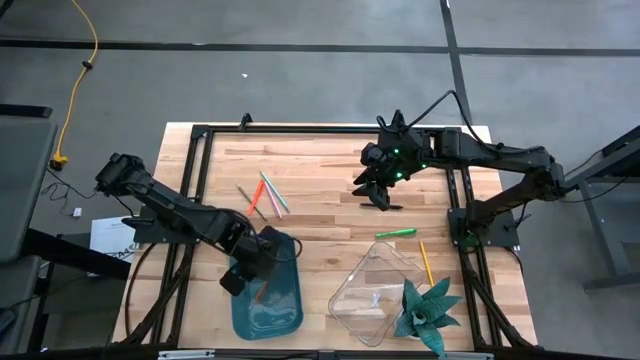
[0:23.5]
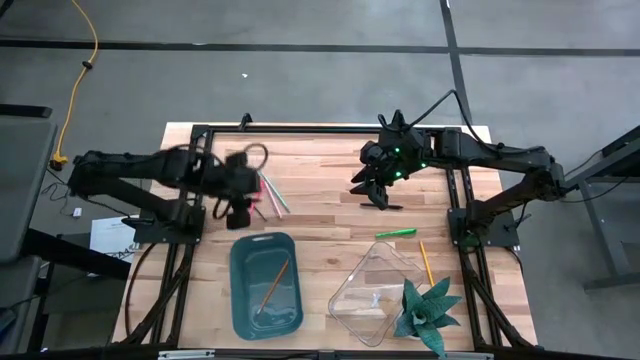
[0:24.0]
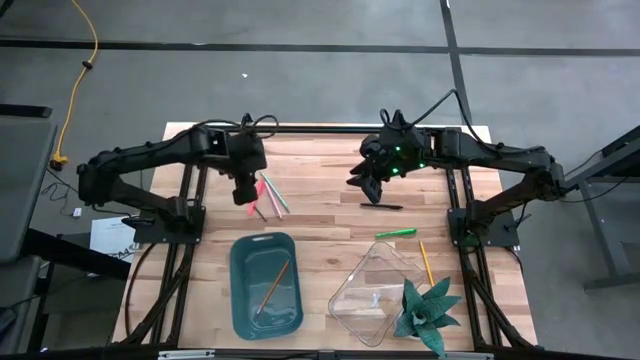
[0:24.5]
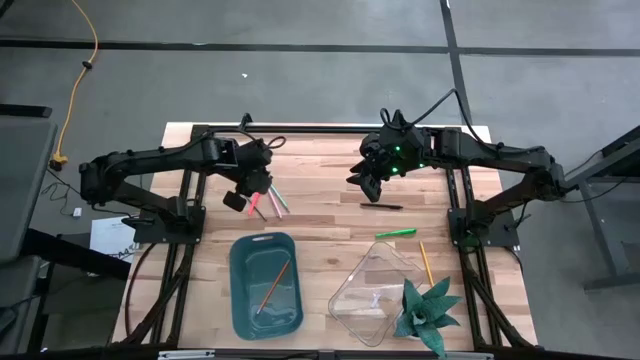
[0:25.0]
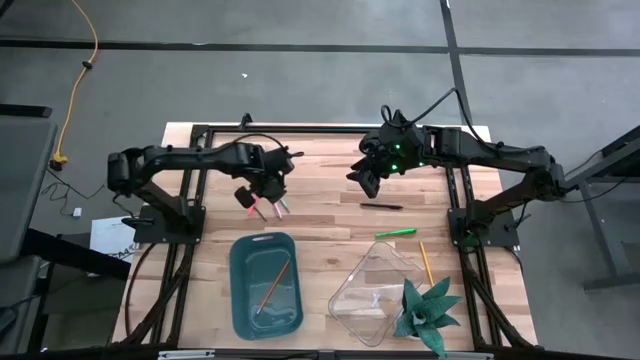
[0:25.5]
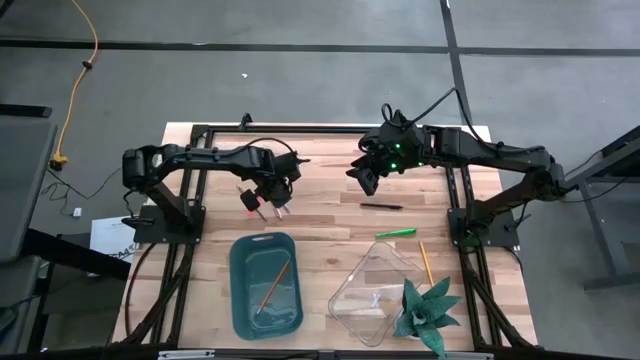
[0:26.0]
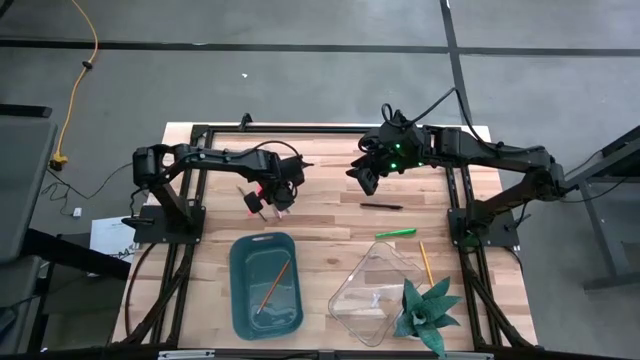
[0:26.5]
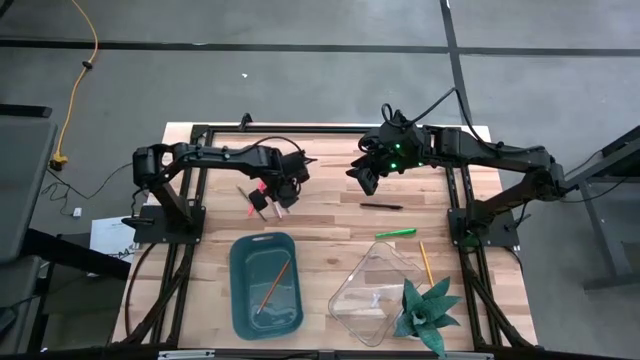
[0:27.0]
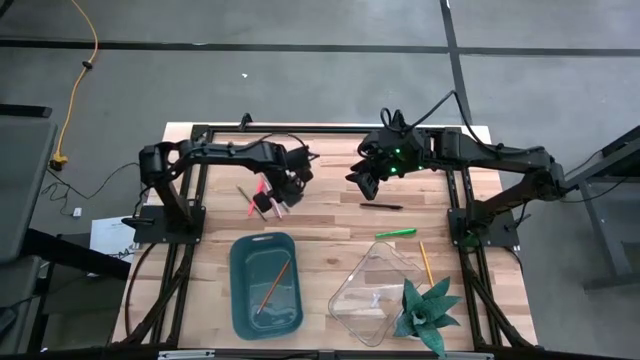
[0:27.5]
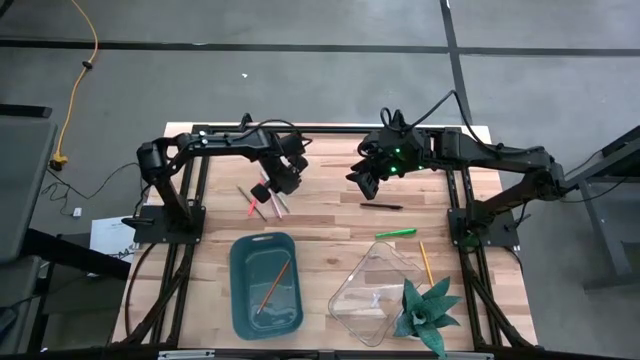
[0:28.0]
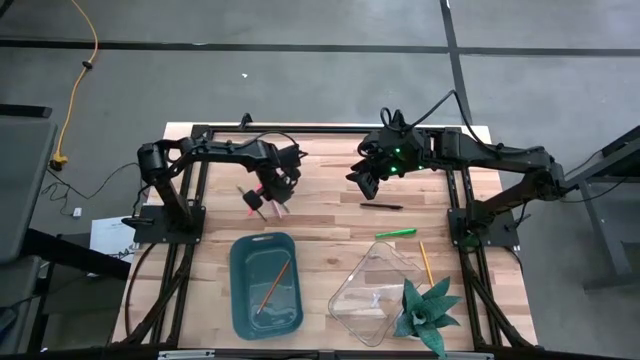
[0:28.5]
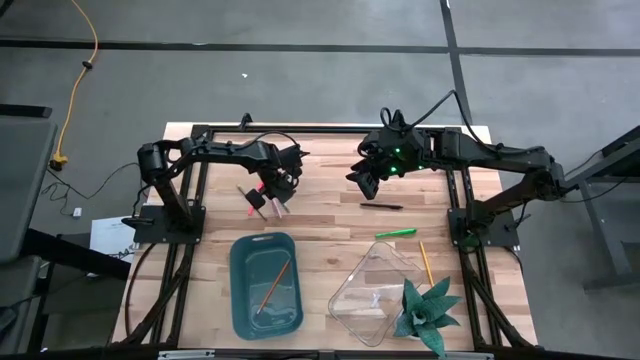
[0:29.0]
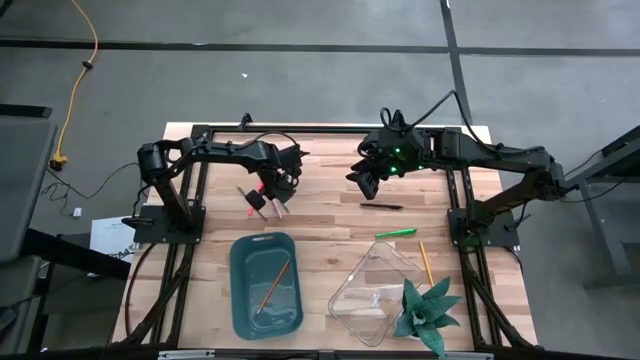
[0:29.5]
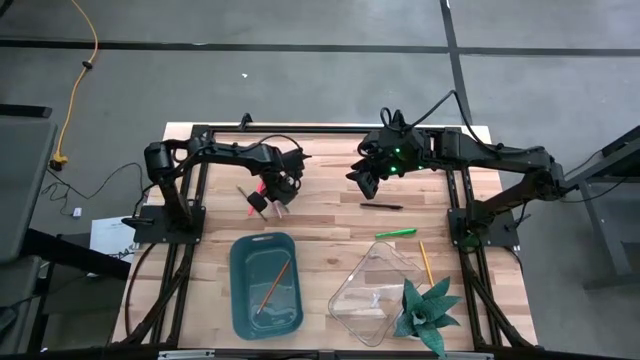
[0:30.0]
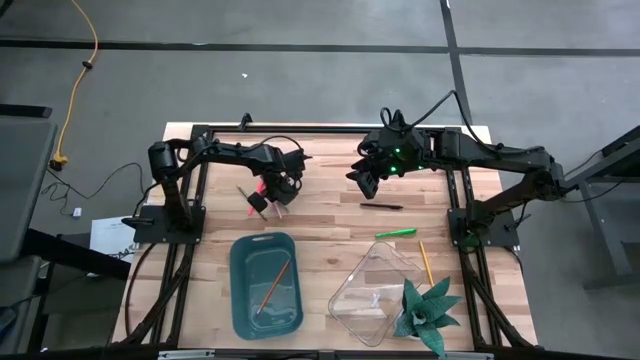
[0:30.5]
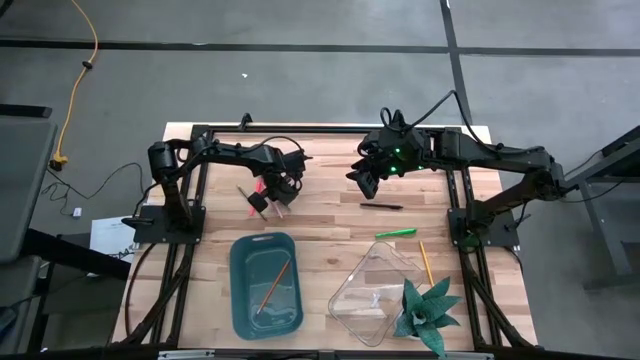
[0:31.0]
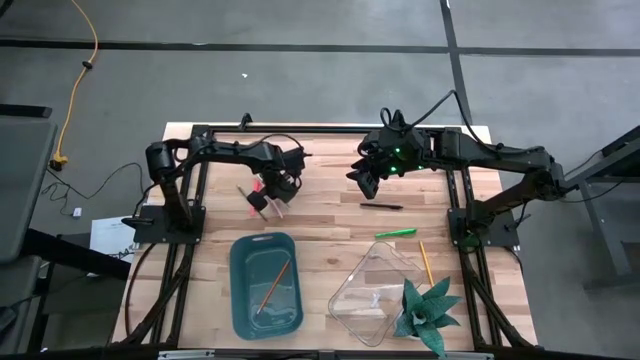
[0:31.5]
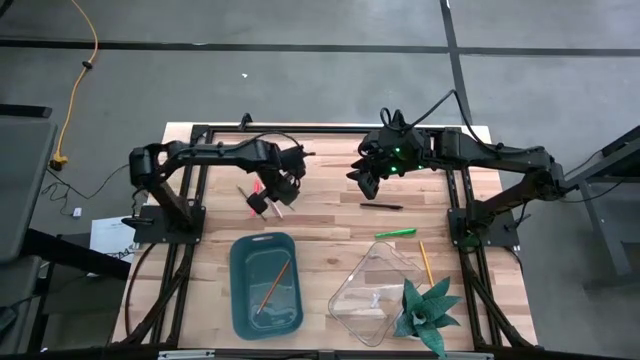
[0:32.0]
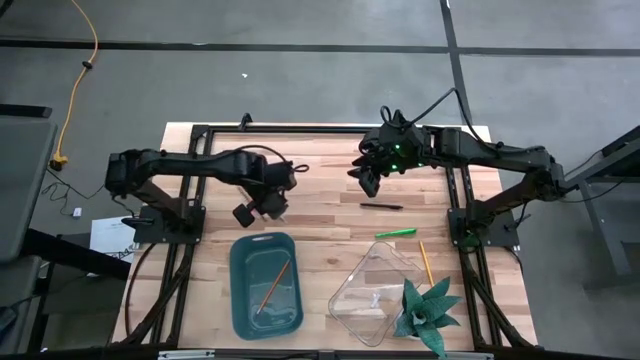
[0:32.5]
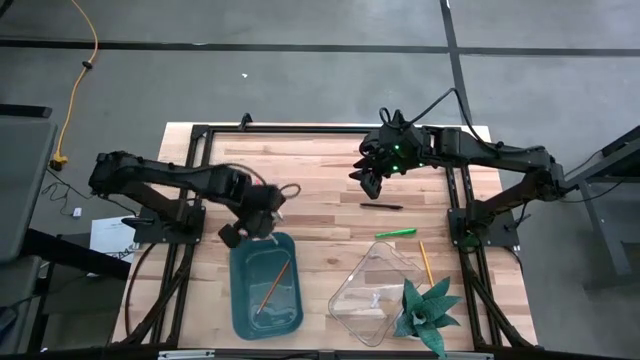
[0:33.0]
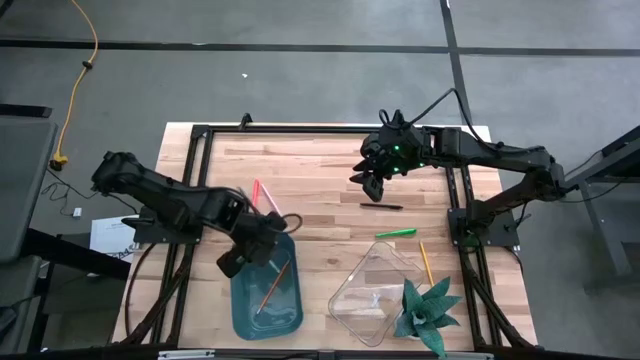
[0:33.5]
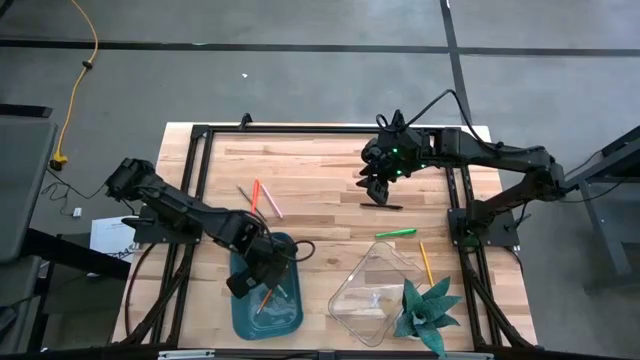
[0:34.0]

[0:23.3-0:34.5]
Task: Sort pens & pencils
Put the light blue pencil into the blue bin

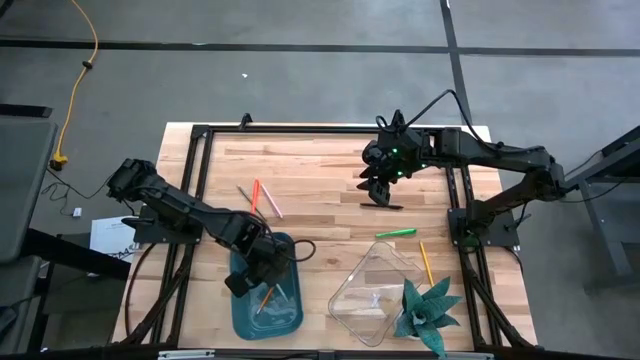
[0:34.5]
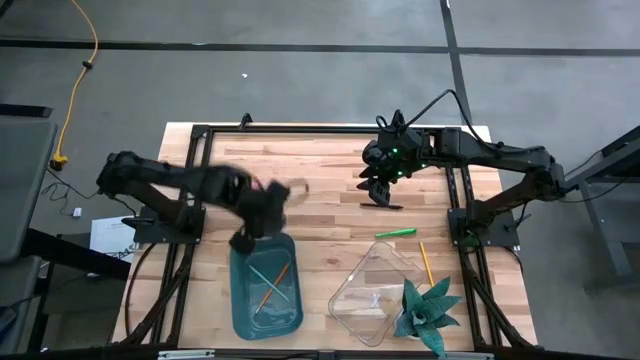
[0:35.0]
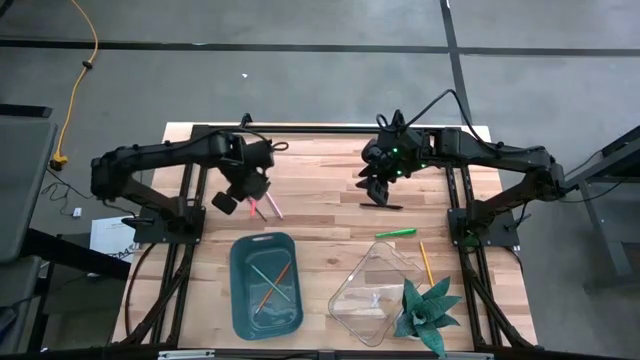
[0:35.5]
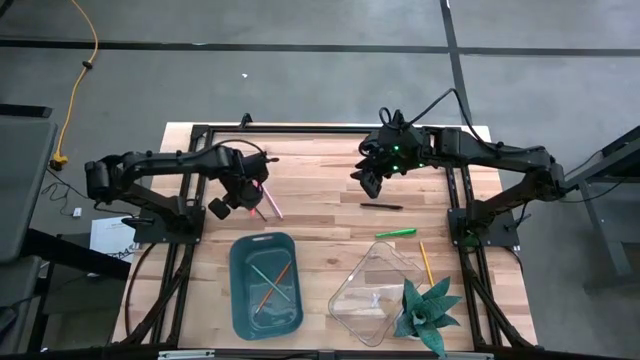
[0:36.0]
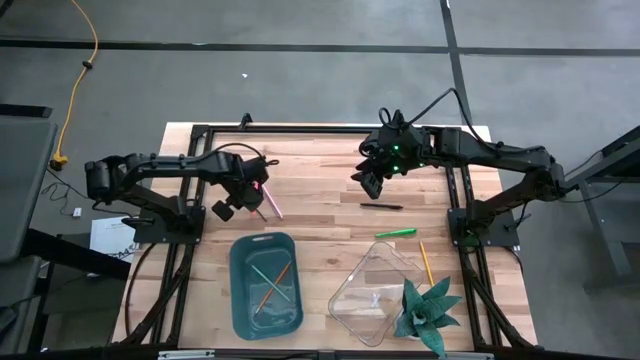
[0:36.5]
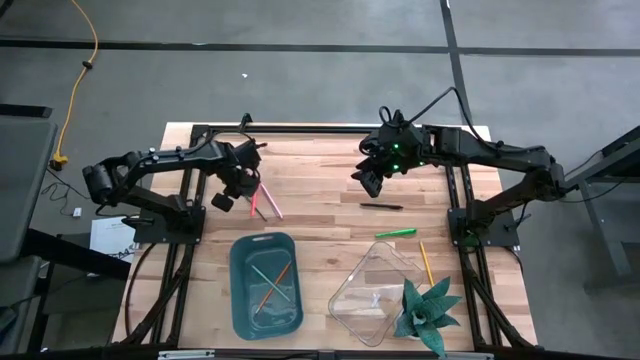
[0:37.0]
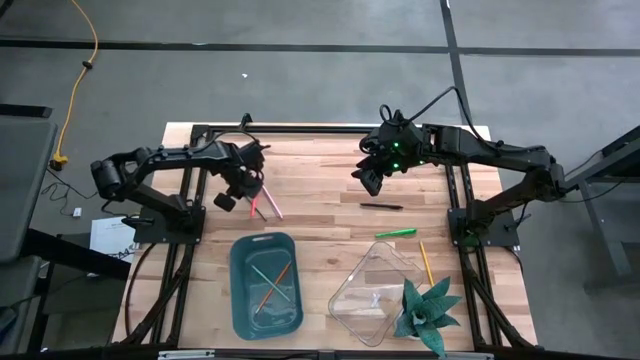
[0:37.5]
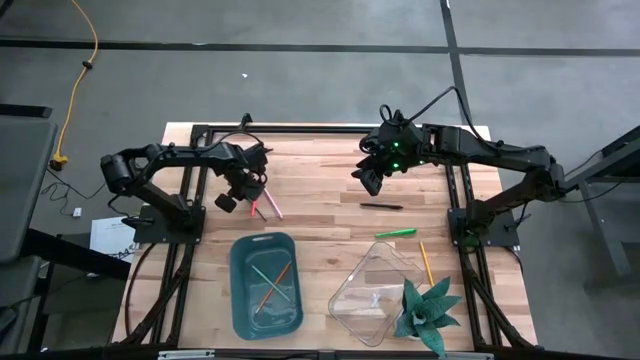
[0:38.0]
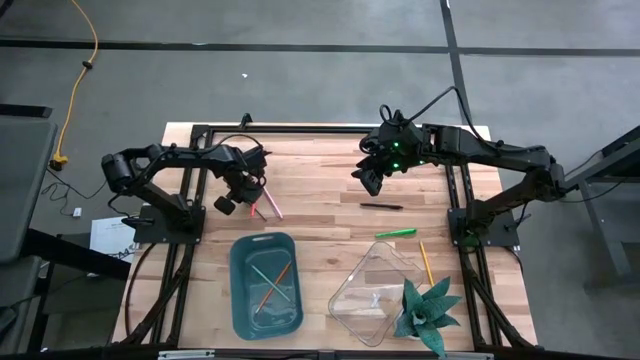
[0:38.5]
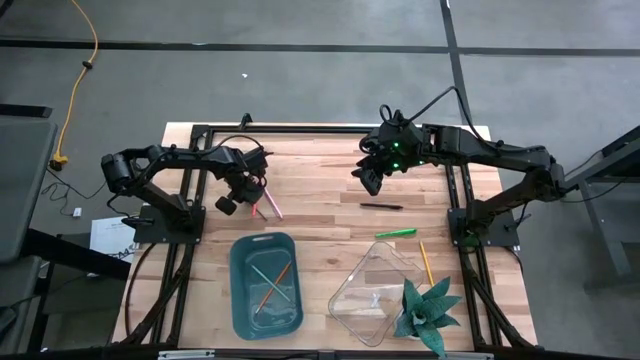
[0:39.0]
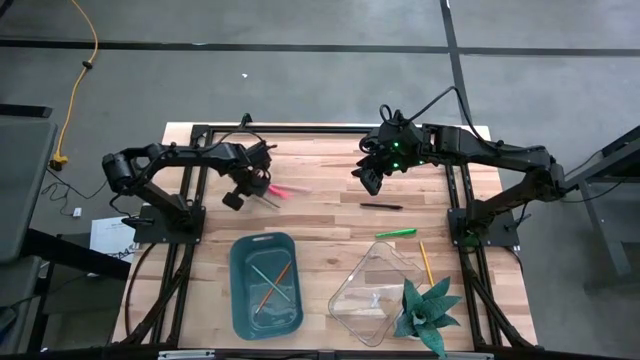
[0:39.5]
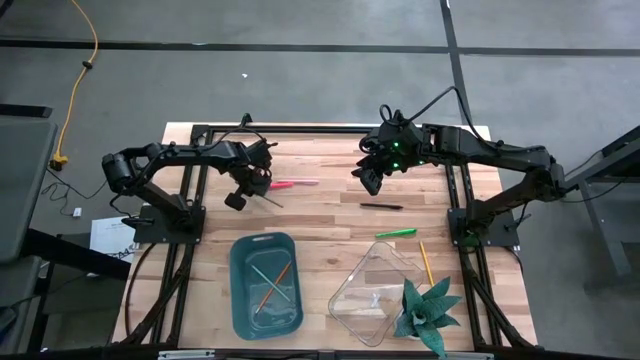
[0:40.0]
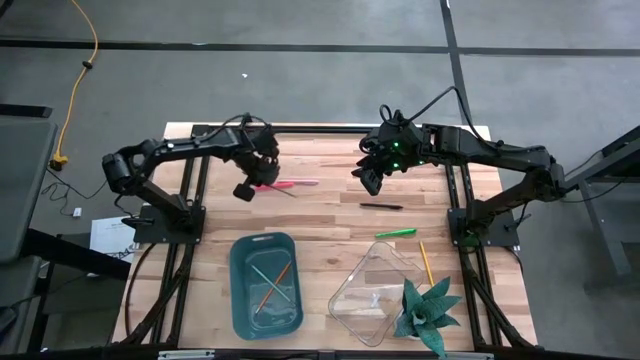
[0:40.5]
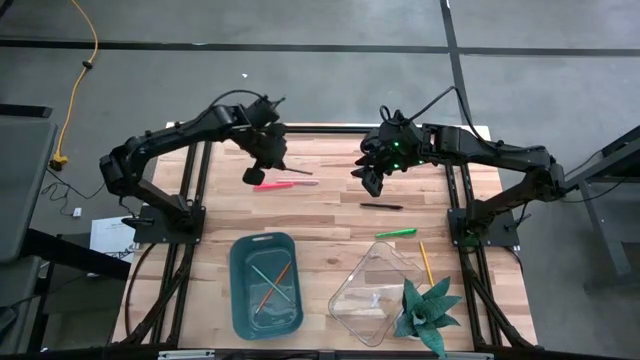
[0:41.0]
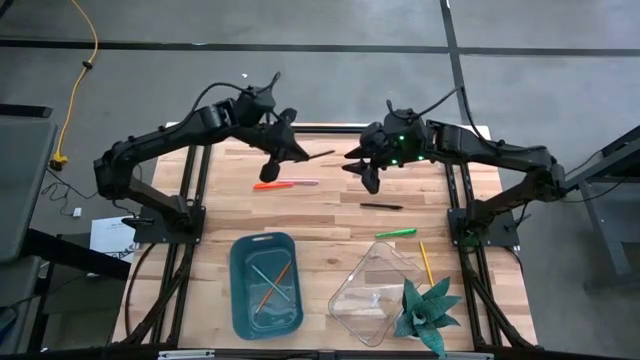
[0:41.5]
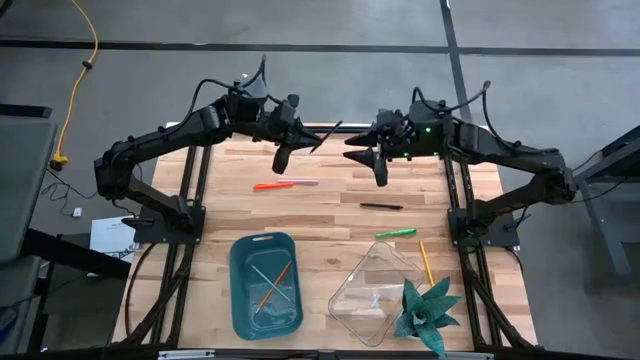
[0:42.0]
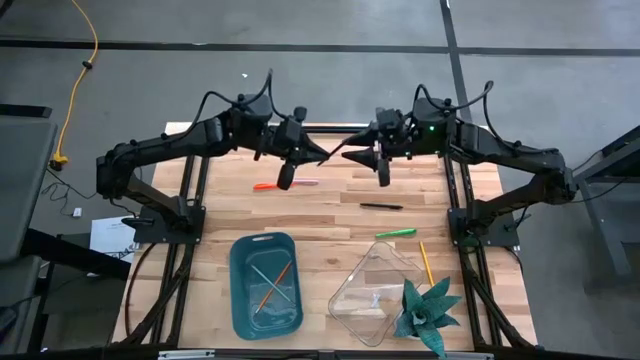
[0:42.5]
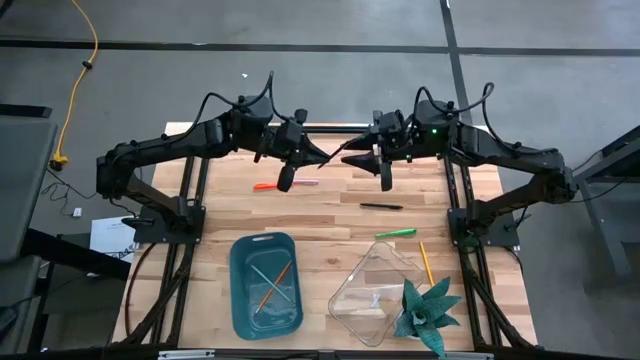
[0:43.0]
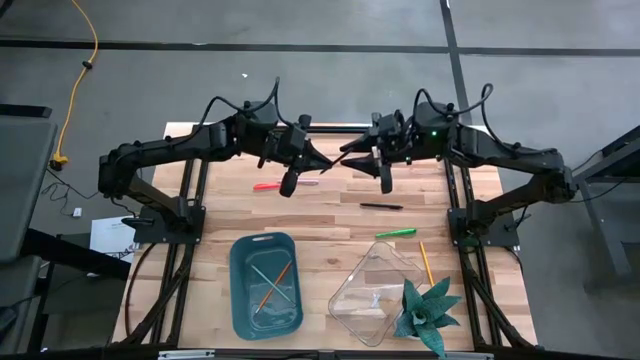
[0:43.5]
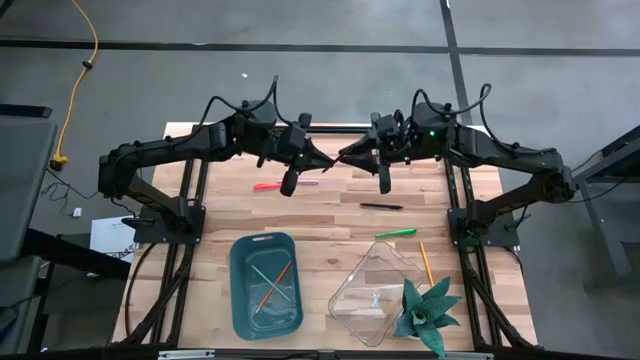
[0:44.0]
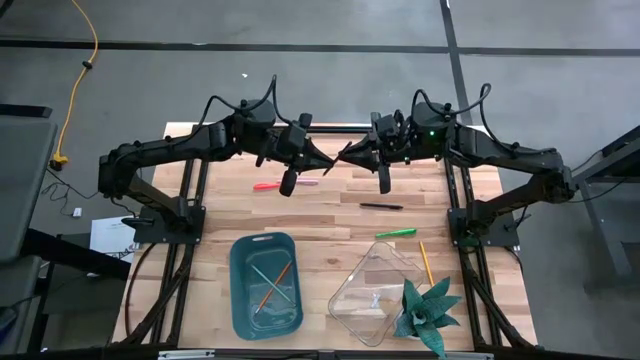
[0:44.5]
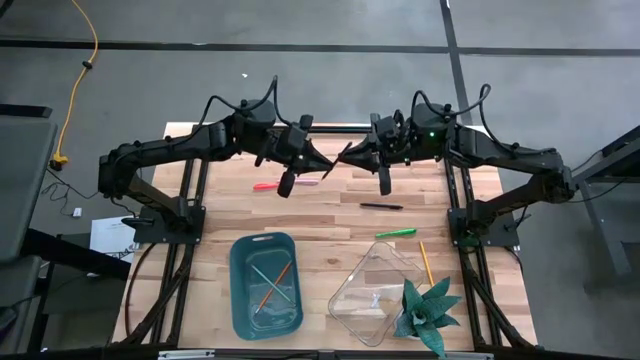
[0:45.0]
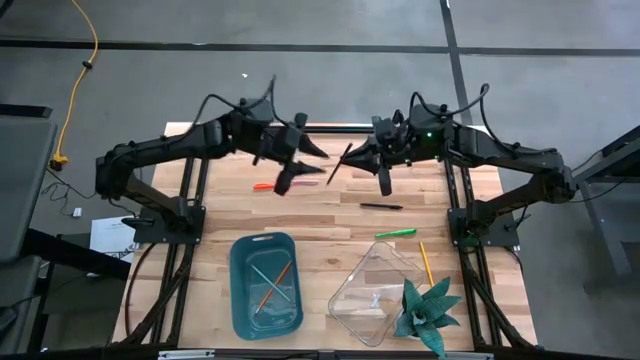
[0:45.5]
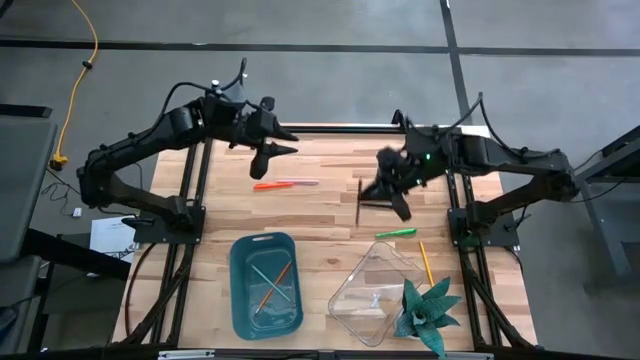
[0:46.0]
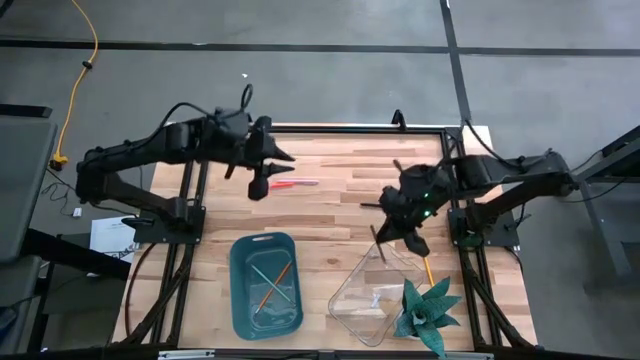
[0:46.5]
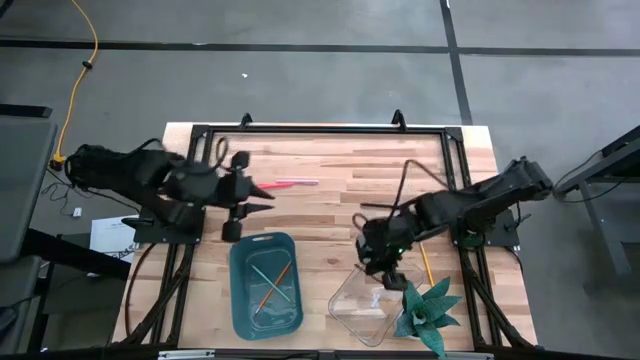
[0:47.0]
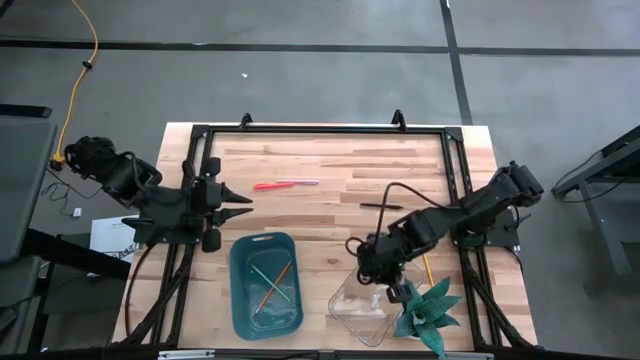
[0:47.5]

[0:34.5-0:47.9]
Put the dark blue pencil into the blue bin
